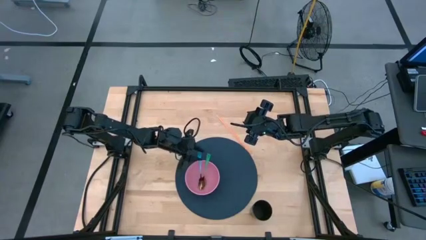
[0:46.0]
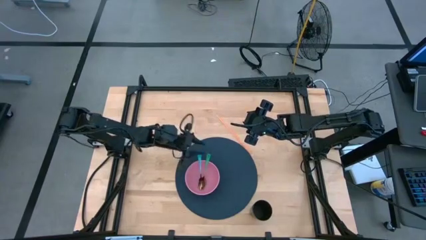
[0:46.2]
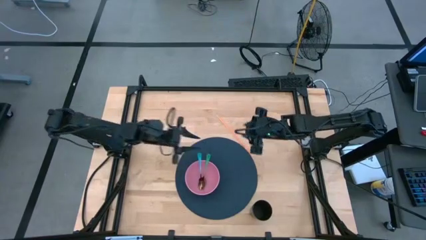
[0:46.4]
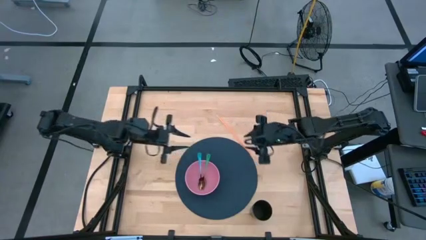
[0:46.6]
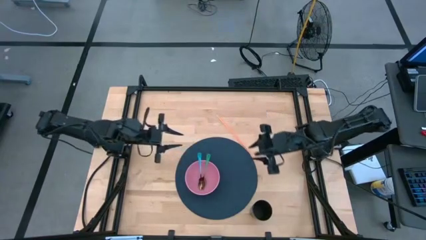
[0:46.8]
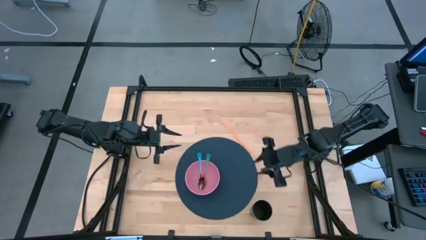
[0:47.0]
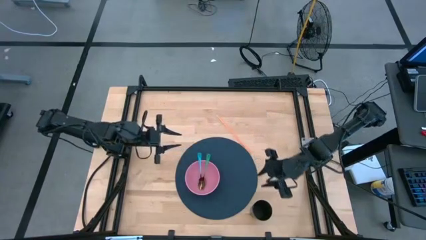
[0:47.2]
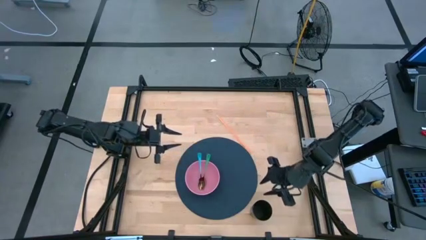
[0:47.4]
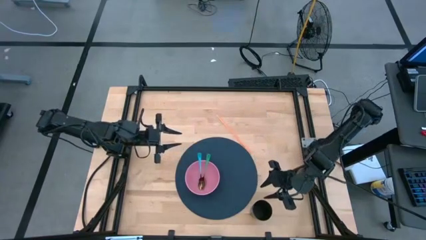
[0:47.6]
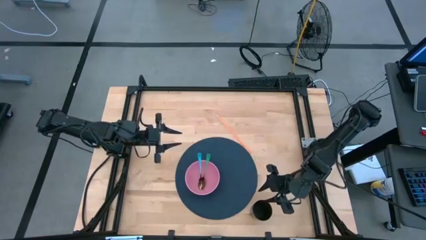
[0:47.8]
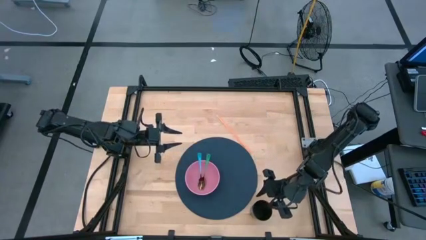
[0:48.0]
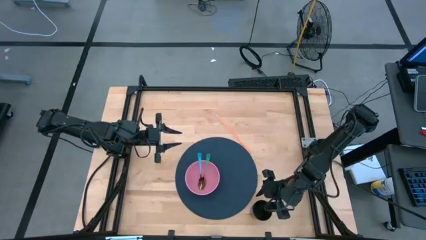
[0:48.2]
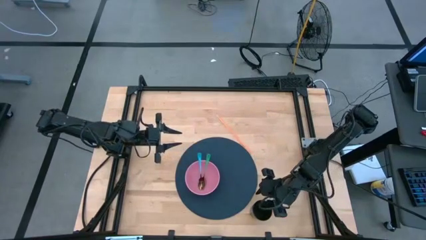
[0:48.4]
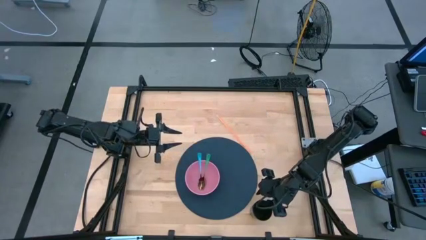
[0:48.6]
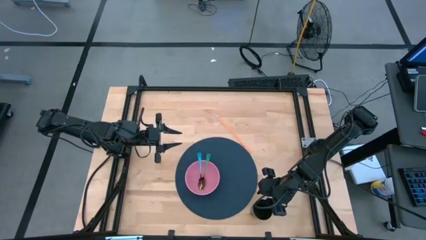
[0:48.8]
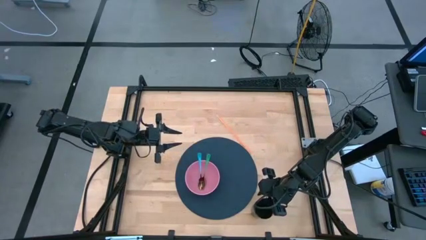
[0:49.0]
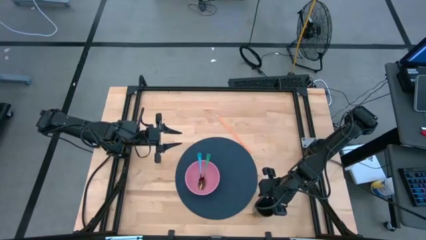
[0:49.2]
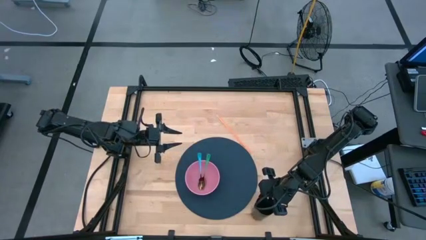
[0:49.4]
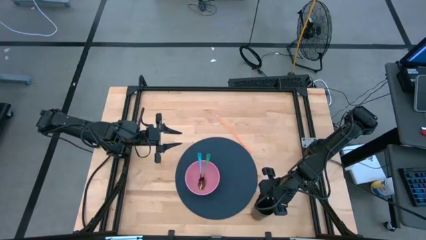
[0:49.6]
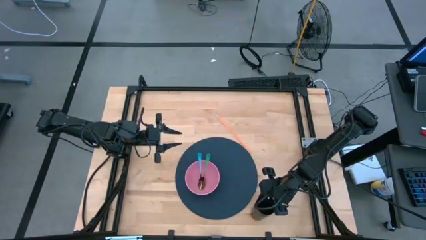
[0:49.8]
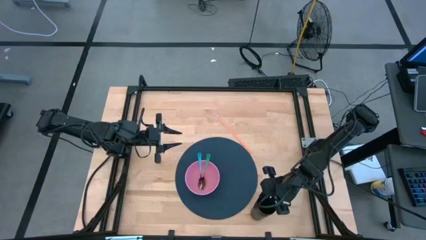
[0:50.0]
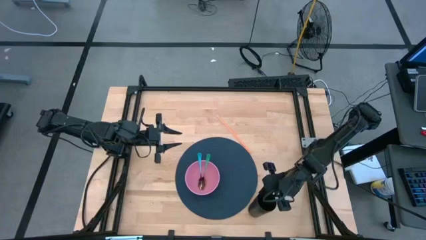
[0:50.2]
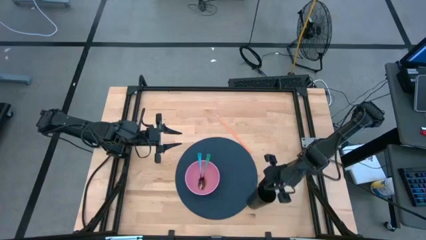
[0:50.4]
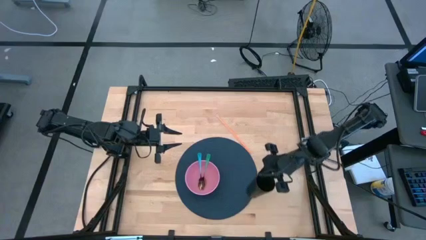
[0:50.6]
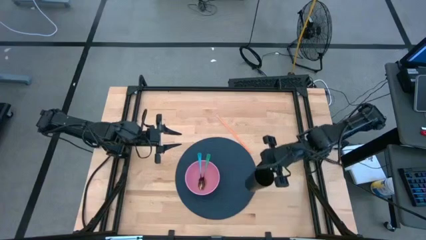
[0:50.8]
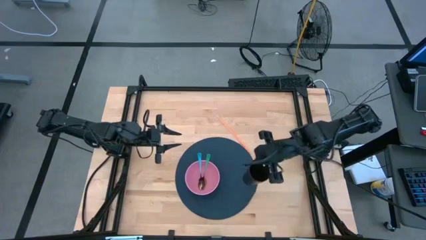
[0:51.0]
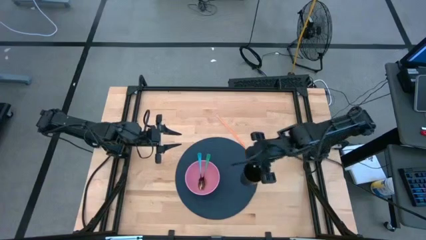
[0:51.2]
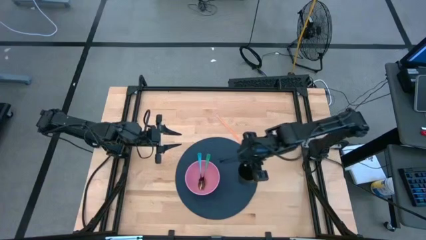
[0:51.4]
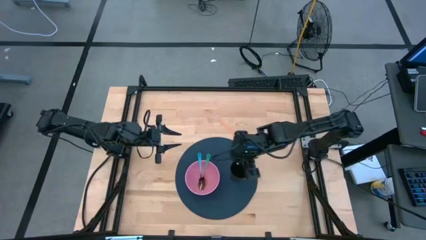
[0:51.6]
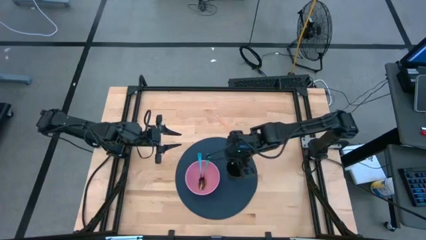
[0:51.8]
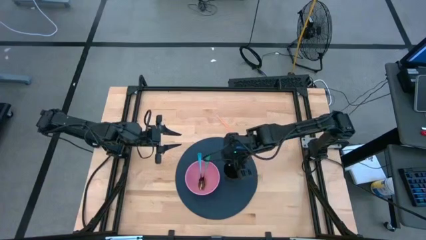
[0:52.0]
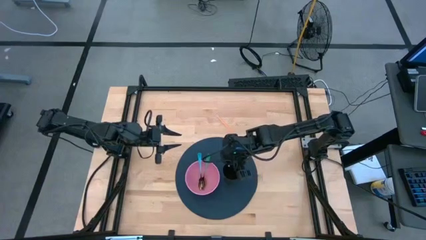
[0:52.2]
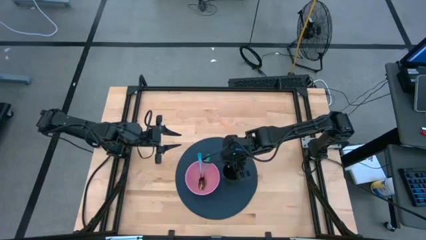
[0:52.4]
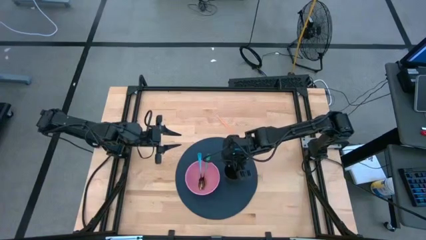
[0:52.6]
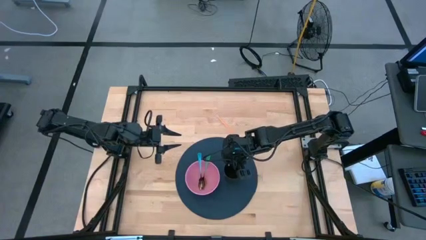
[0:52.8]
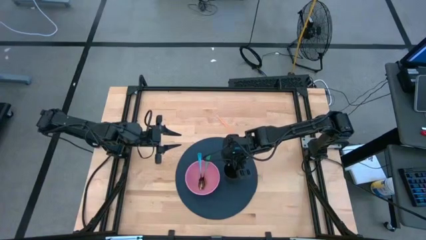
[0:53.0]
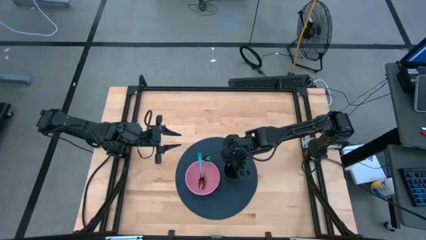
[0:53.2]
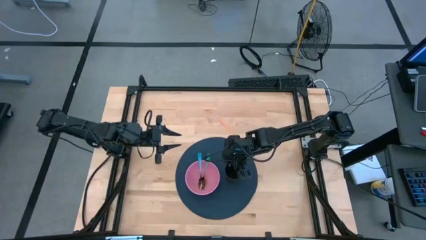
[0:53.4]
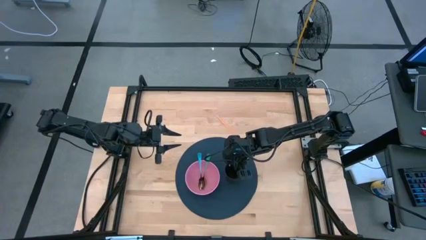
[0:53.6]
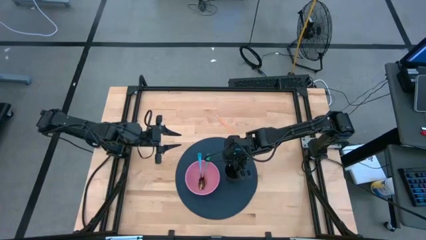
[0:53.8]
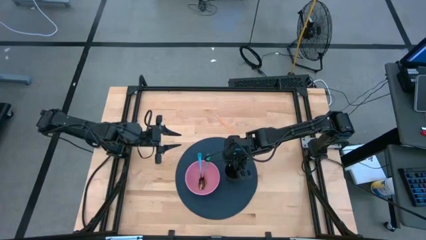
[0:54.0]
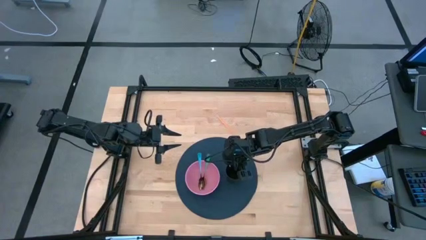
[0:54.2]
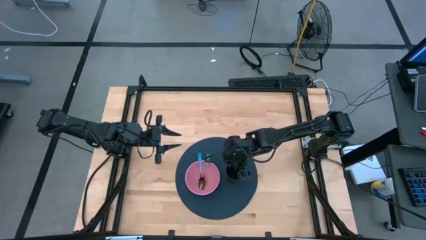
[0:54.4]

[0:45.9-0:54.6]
Task: Pick & Place Utensil
Put the black cup to the right of the pink bowl on the blue mat

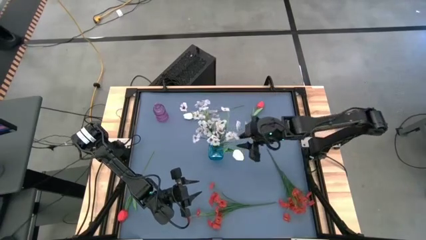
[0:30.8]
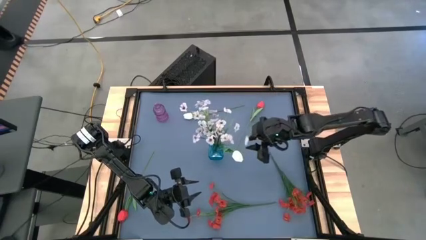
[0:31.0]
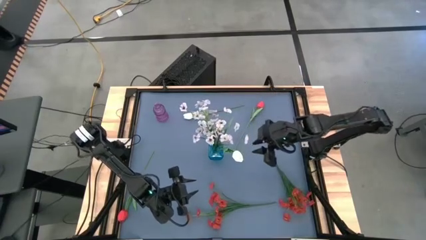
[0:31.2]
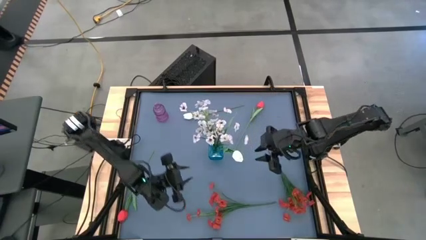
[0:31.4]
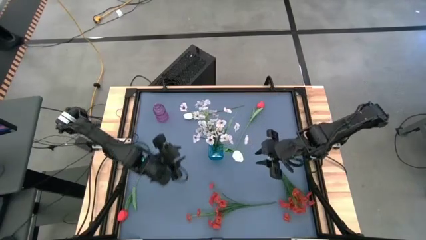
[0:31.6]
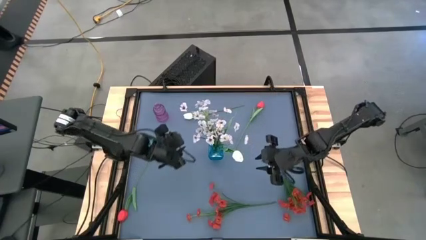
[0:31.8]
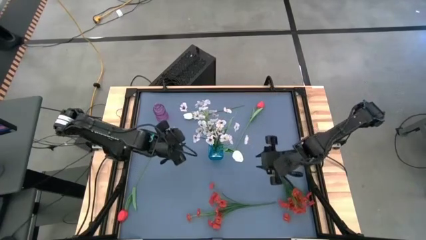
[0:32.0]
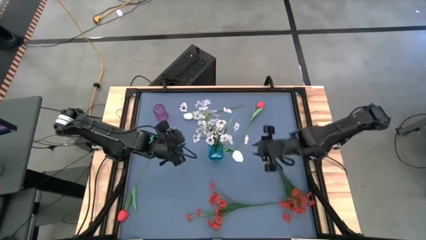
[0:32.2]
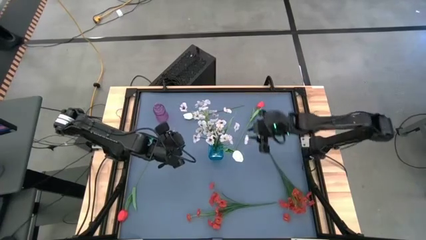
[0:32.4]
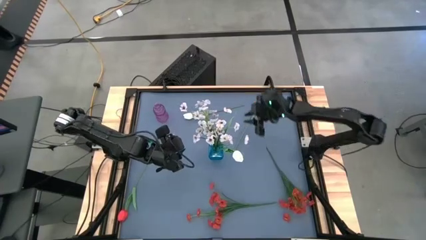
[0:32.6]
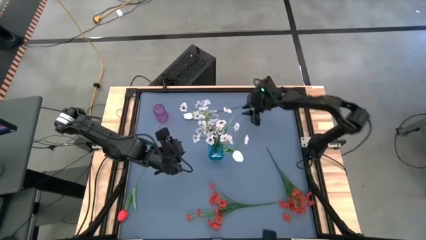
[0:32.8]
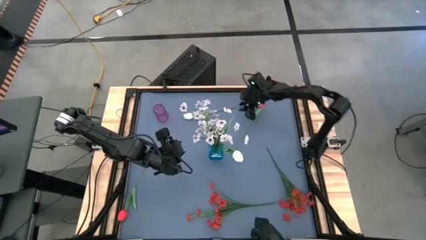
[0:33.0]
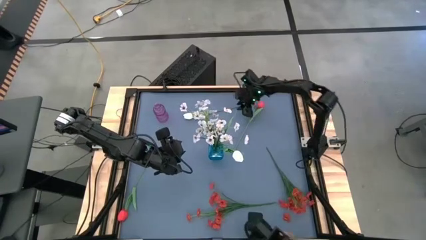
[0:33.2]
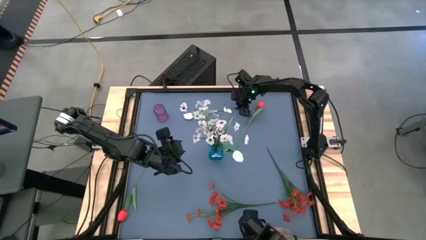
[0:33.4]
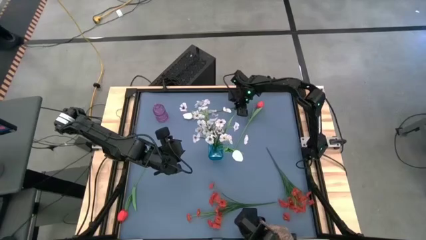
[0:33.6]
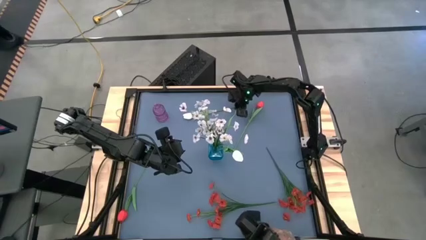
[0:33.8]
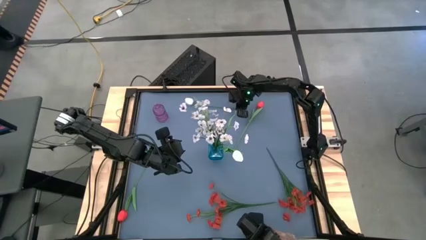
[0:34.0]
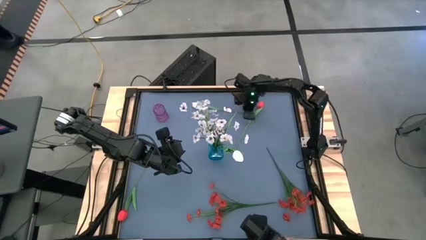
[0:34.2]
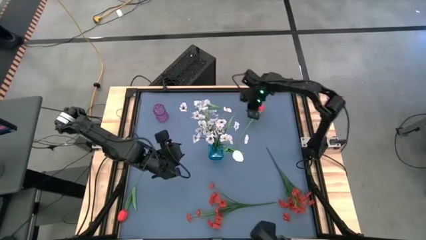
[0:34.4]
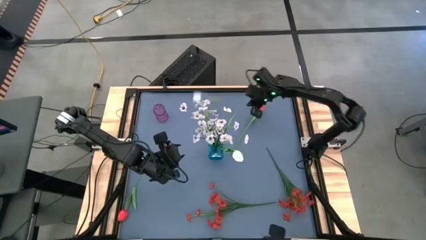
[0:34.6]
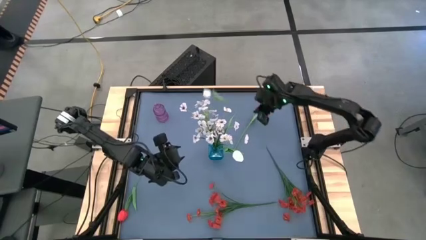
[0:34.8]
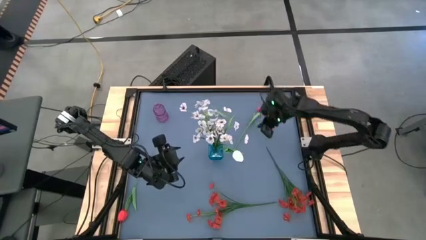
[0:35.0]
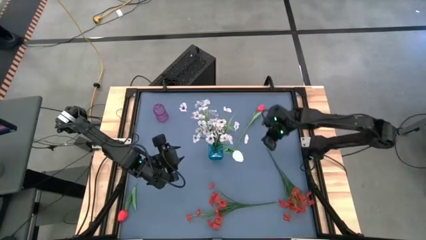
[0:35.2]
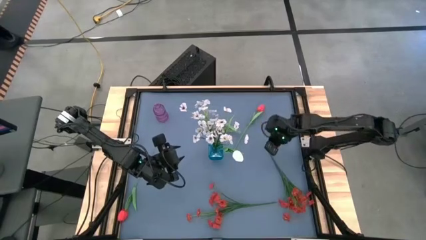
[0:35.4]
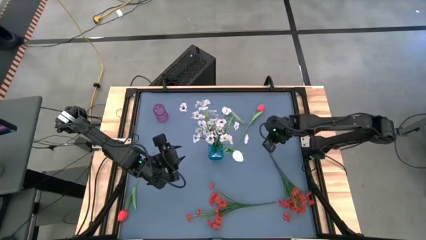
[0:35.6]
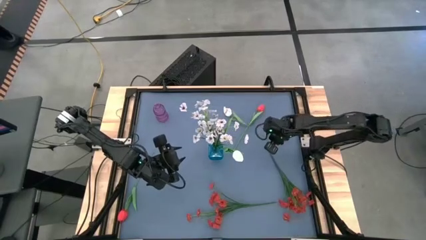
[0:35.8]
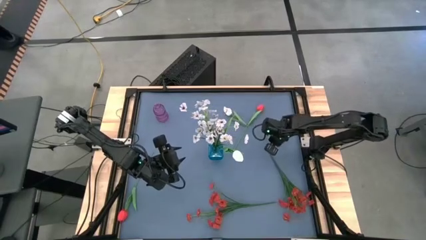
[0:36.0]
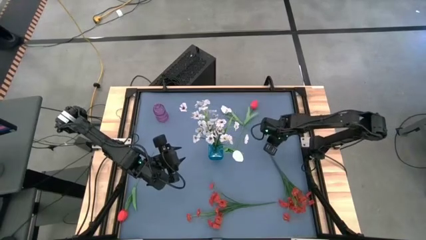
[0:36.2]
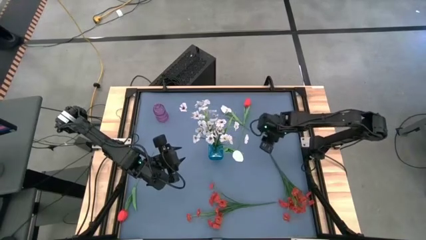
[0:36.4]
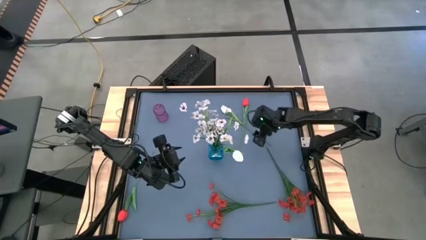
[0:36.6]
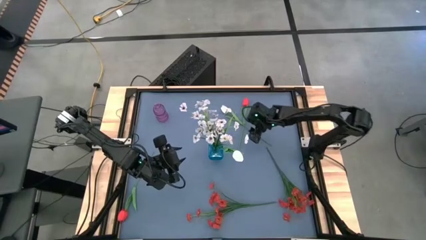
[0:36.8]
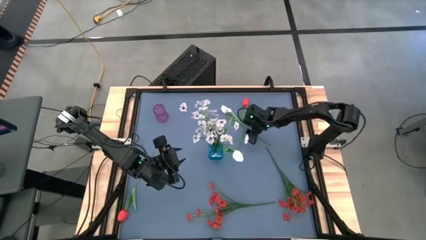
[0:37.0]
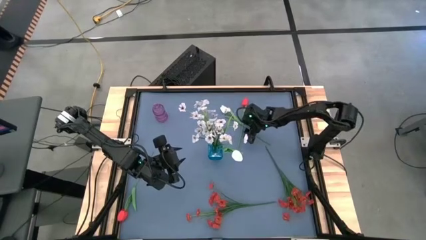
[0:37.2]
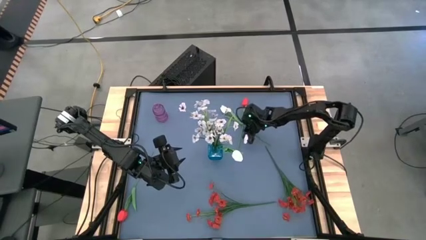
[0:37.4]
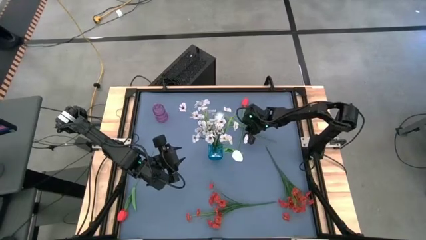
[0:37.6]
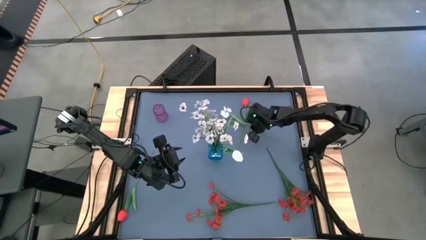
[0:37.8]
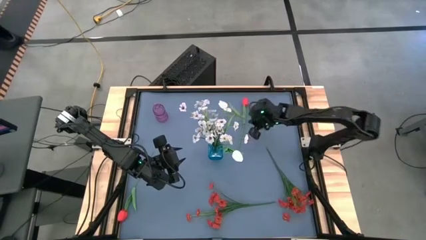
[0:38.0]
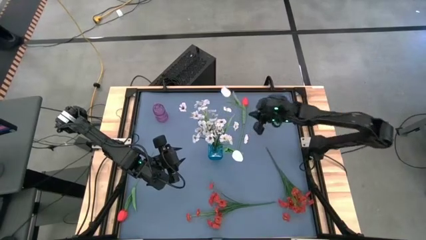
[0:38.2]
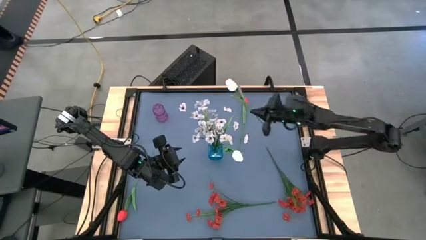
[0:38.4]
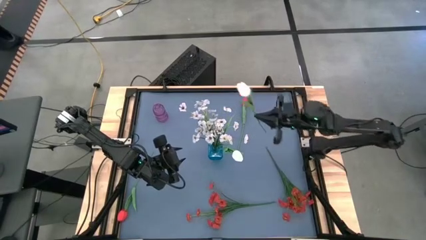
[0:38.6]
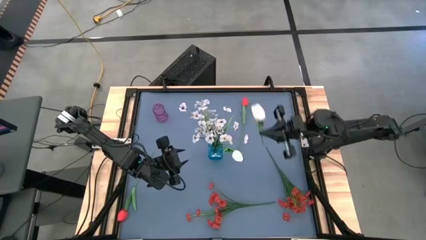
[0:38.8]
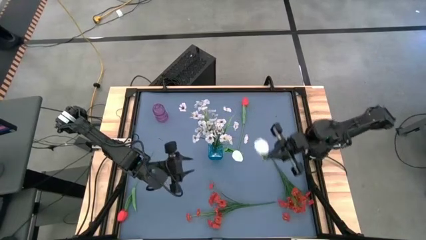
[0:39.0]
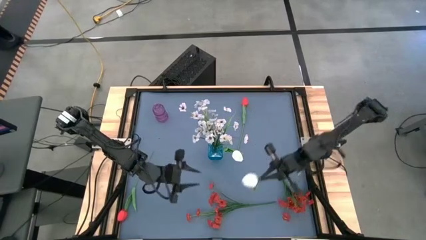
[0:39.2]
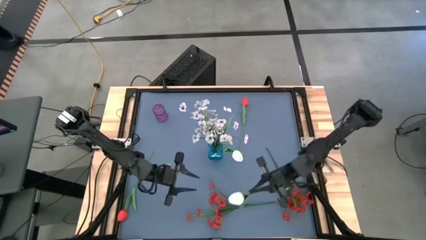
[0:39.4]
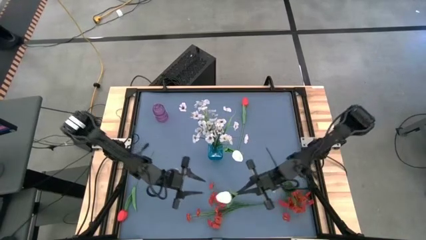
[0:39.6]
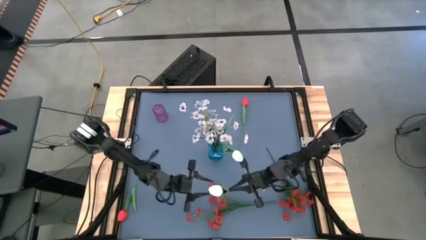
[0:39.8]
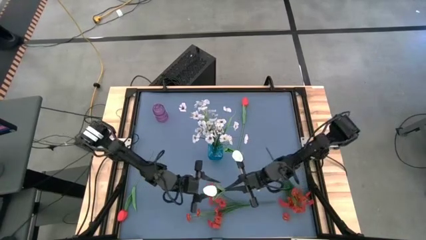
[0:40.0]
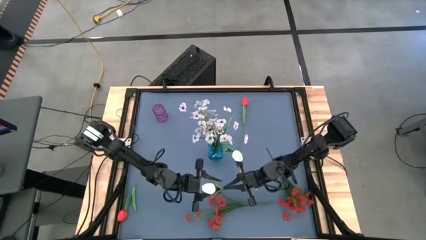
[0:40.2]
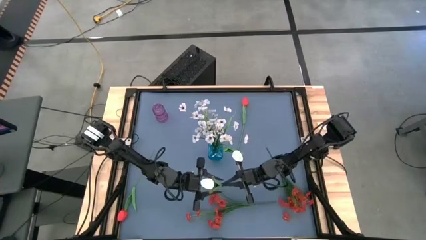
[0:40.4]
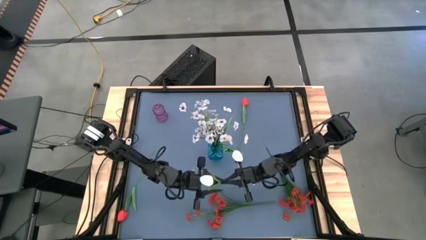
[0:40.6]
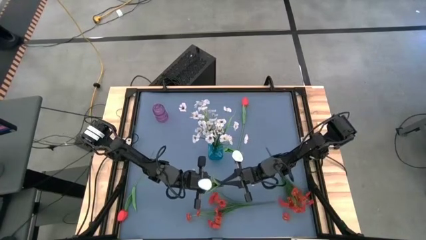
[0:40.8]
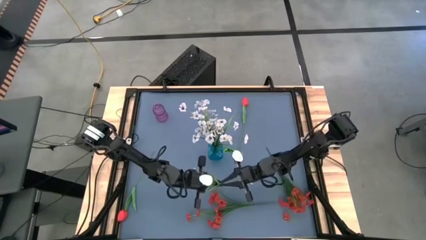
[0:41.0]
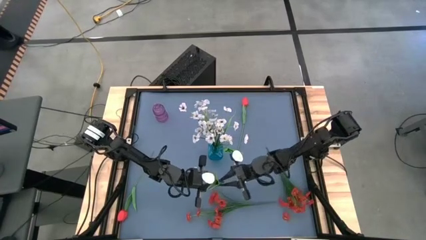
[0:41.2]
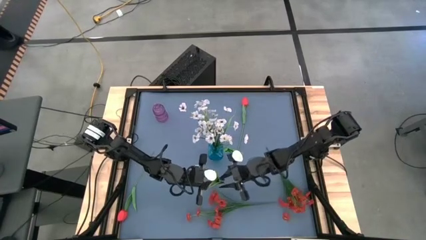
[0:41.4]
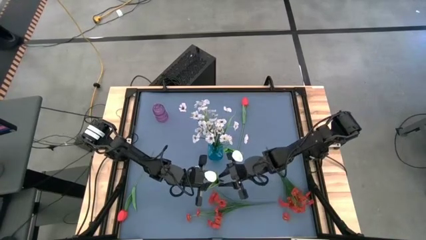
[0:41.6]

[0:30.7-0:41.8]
Task: Sort flowers into vase by color
Put the white flower into the blue vase
